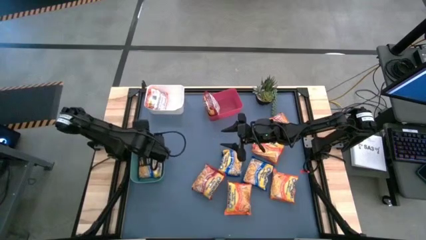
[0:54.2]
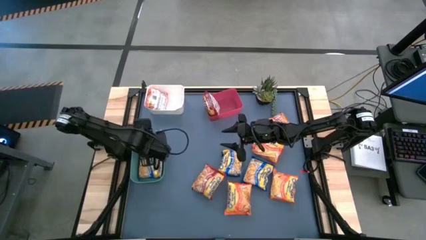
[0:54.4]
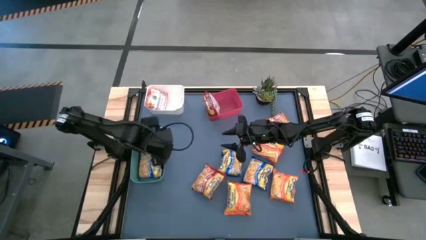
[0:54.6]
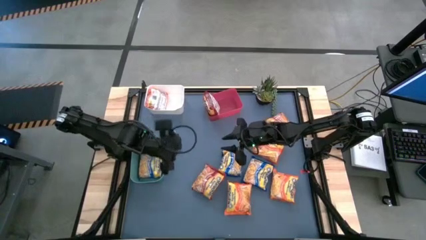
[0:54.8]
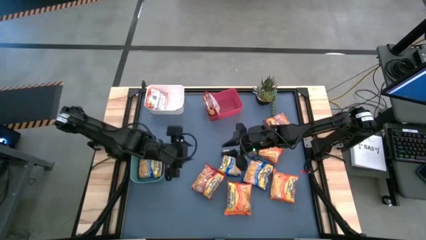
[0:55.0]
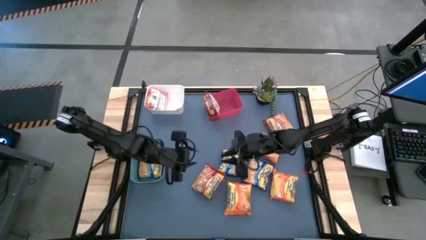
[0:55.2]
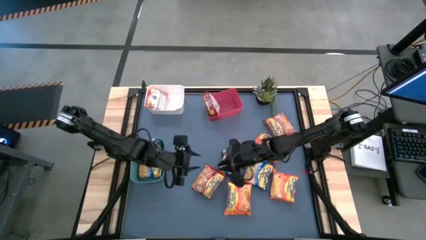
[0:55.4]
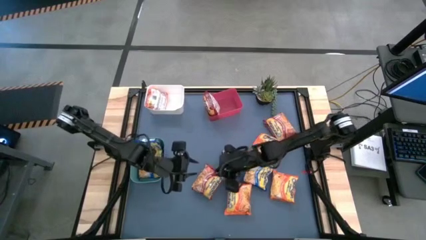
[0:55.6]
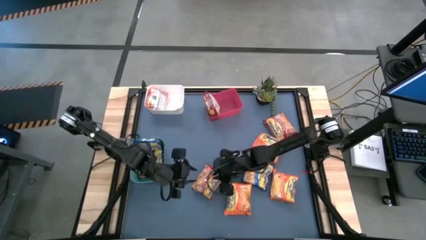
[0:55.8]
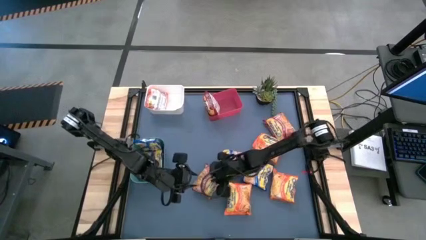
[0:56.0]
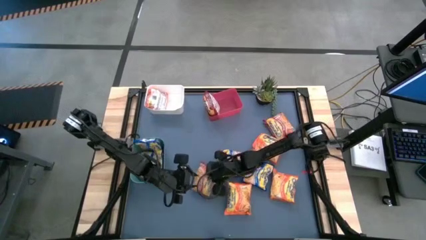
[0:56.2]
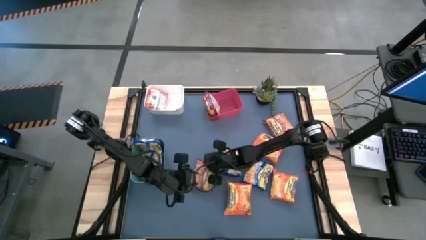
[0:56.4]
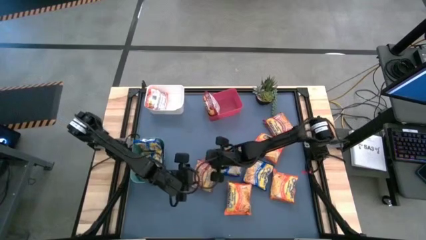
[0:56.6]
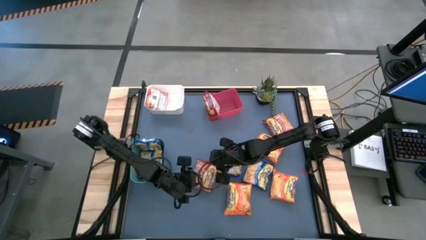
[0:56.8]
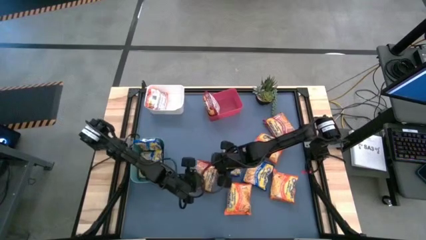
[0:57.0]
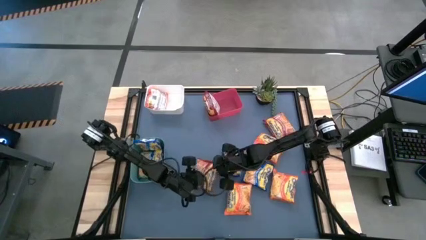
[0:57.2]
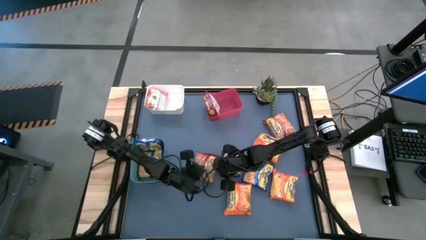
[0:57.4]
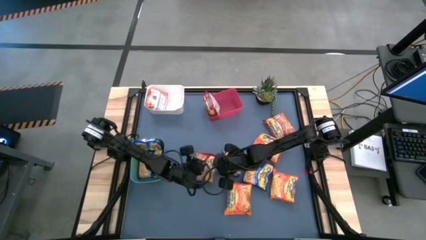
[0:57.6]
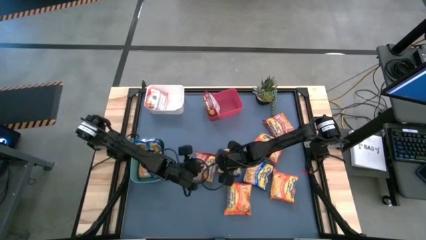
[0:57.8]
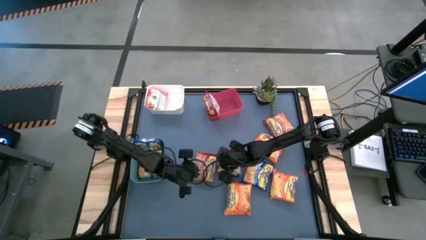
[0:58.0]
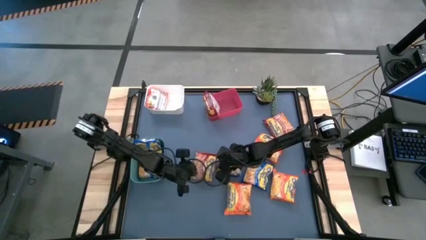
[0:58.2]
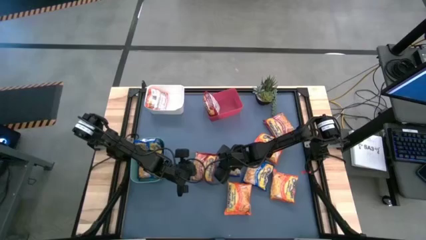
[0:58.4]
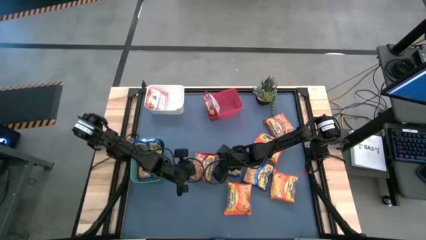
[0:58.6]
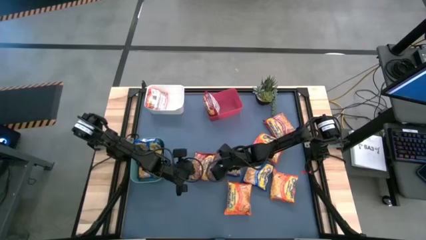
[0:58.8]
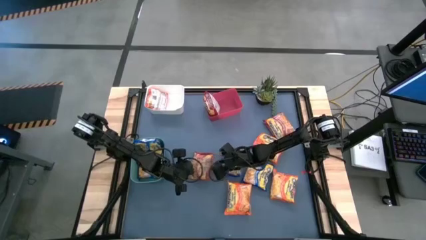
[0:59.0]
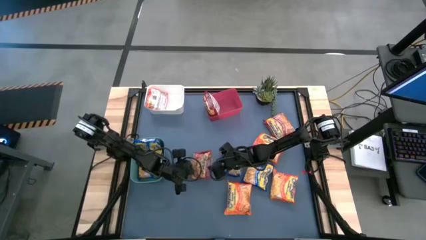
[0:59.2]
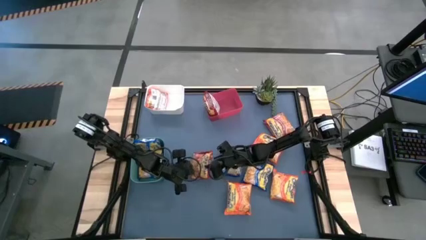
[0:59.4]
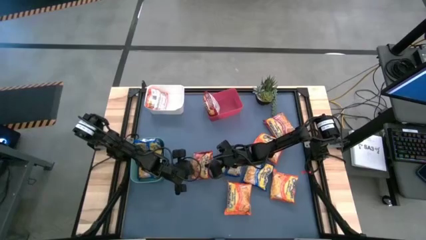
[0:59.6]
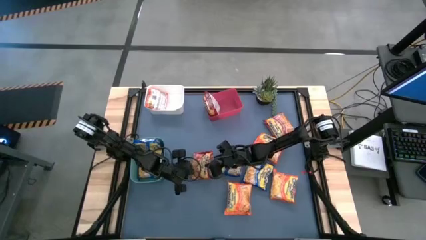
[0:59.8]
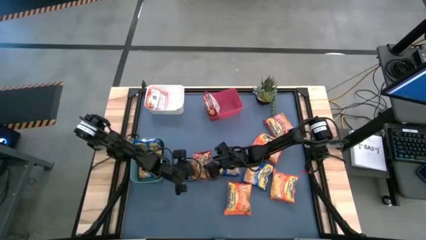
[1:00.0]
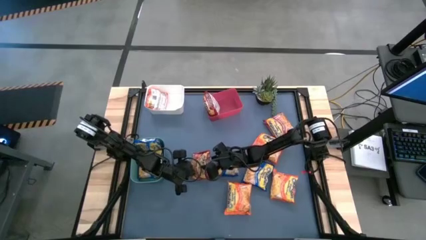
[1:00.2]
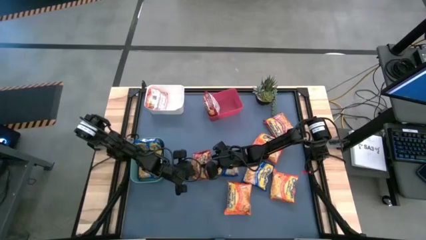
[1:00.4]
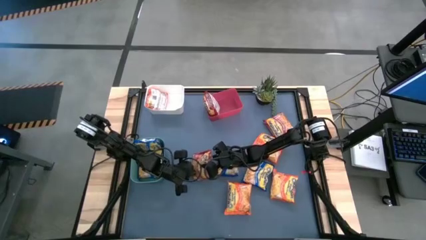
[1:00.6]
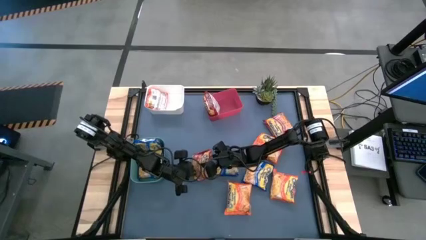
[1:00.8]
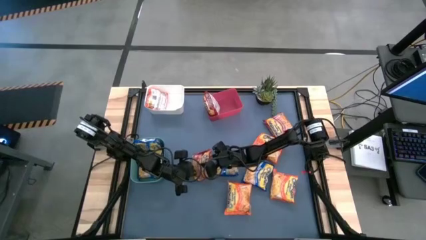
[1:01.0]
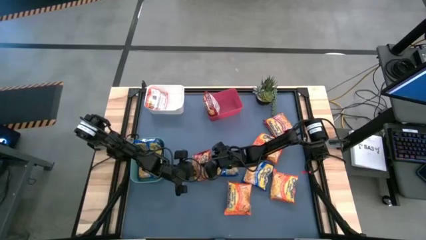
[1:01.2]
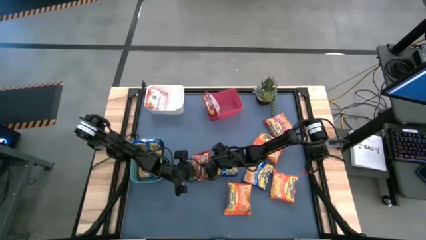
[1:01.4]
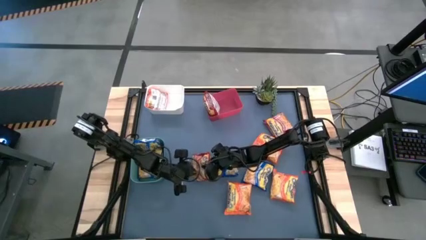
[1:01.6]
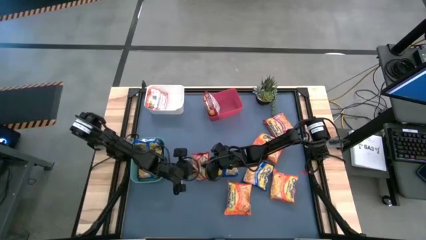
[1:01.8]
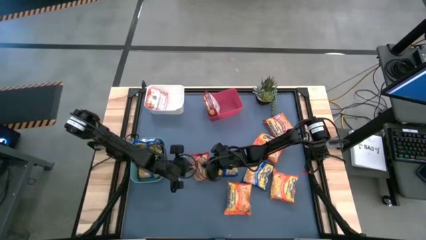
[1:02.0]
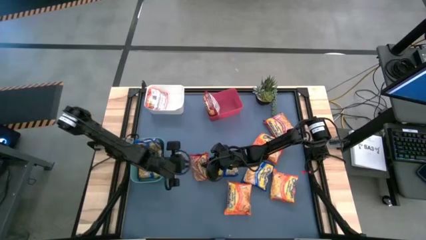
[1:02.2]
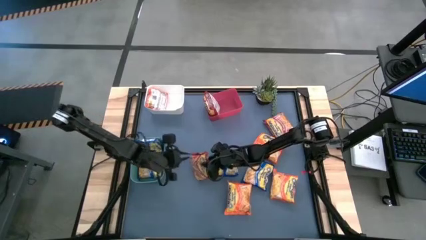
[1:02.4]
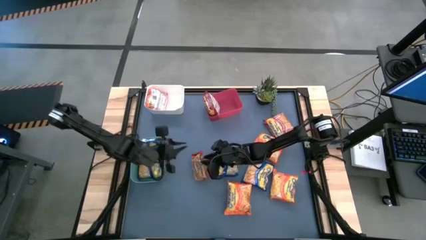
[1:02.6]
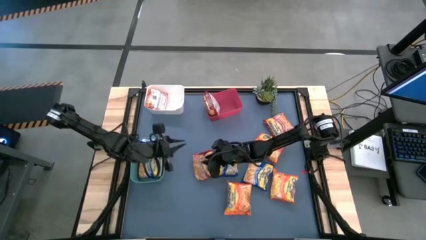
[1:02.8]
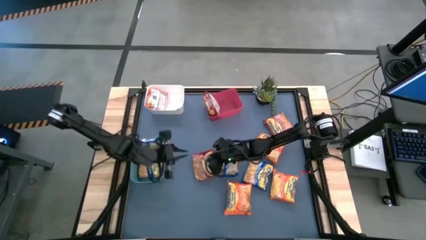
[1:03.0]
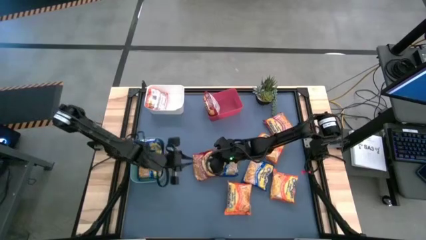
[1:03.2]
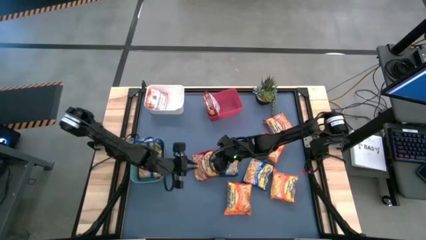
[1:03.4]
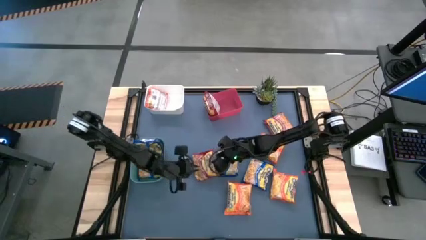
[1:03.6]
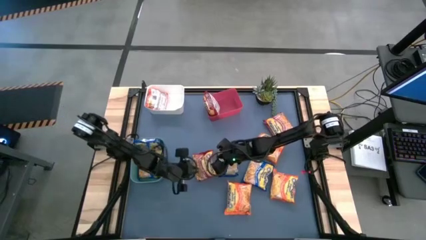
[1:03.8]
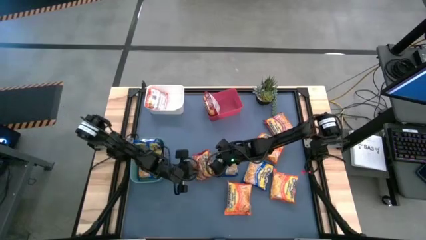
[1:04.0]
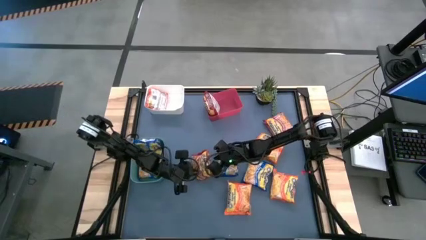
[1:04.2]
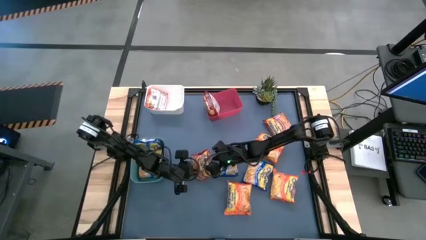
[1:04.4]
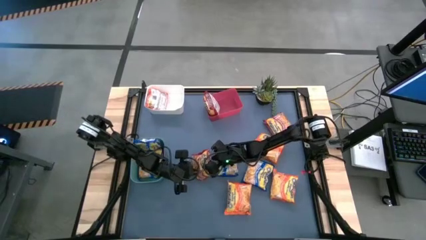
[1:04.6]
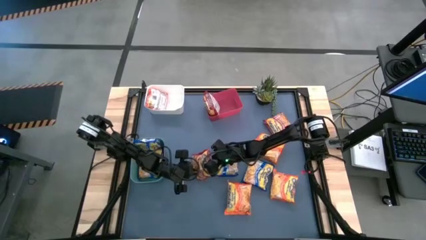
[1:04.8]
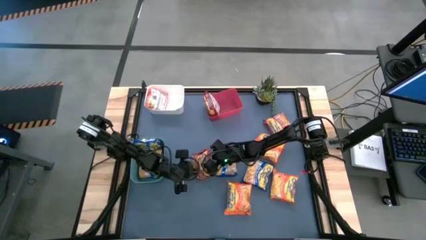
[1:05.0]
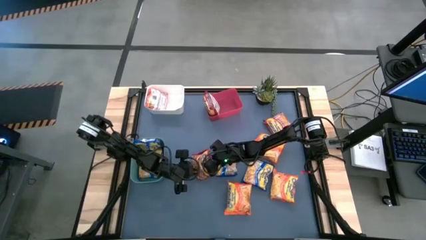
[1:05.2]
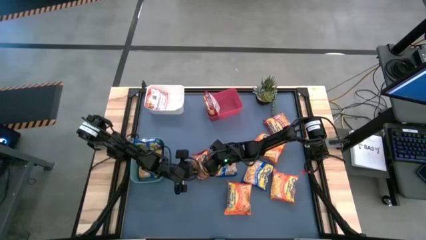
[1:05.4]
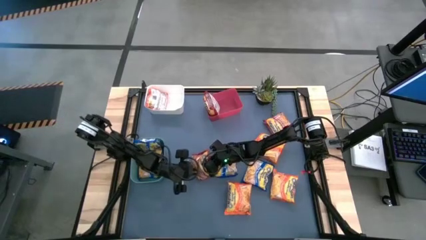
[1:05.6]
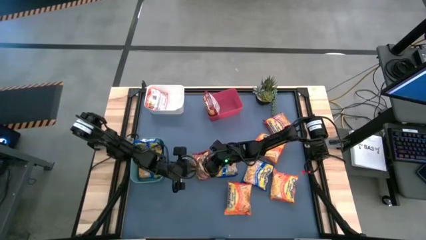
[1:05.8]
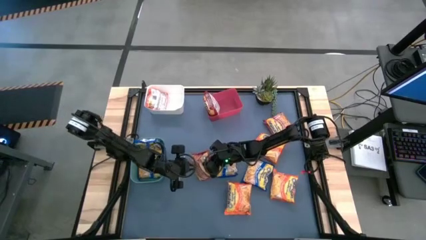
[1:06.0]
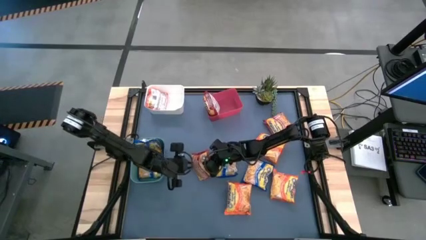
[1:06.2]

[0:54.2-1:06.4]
Task: Sort Maruchan noodles
Put the red noodle pack into the red bin

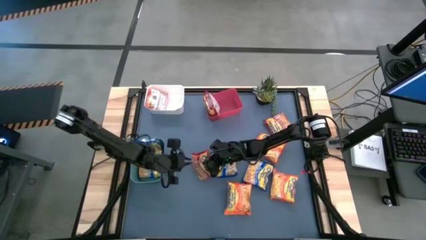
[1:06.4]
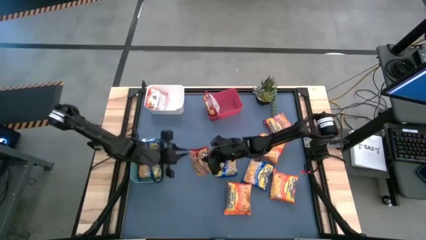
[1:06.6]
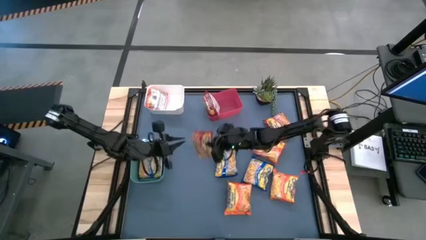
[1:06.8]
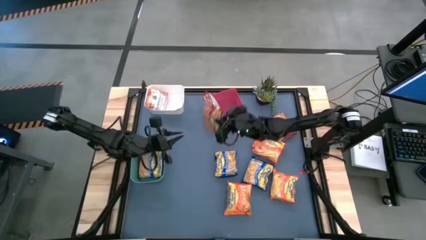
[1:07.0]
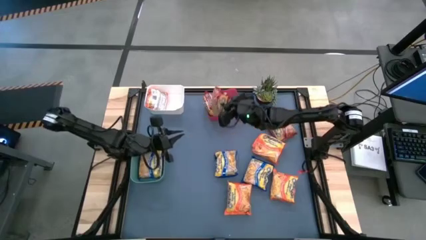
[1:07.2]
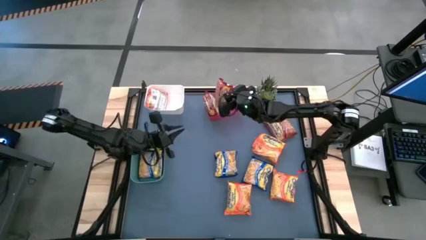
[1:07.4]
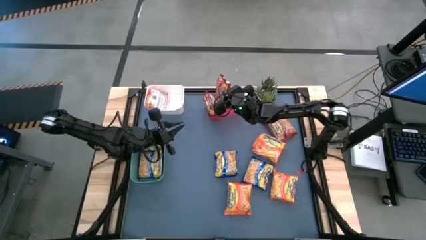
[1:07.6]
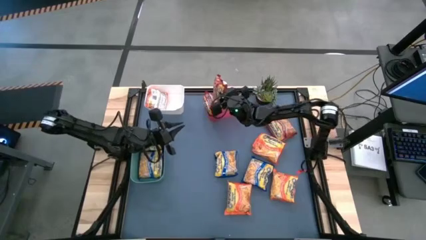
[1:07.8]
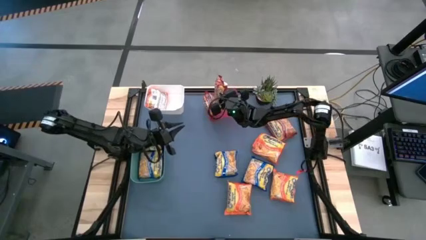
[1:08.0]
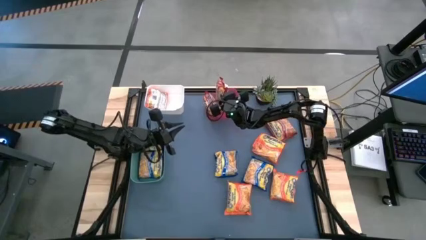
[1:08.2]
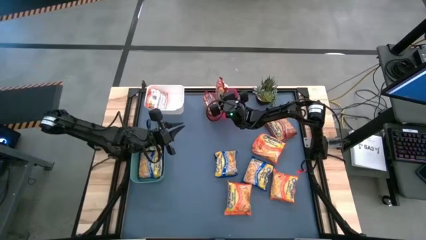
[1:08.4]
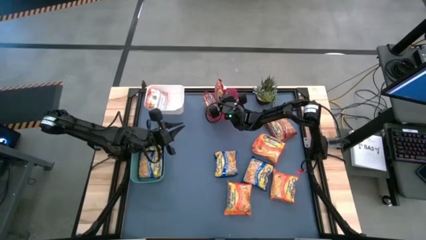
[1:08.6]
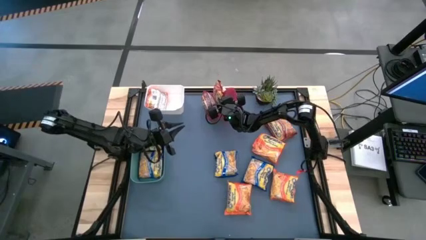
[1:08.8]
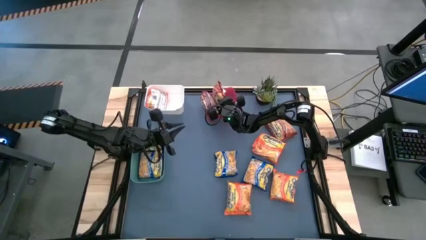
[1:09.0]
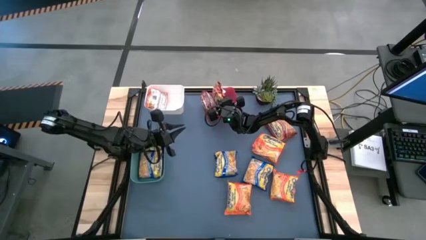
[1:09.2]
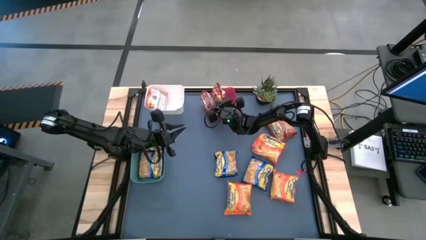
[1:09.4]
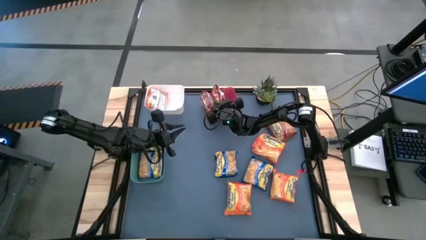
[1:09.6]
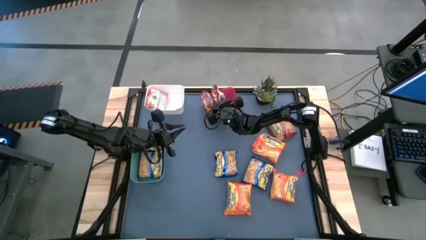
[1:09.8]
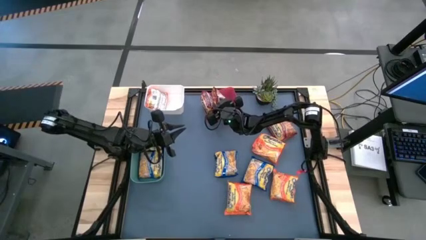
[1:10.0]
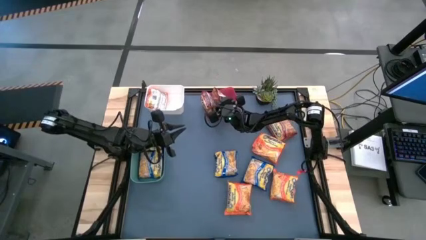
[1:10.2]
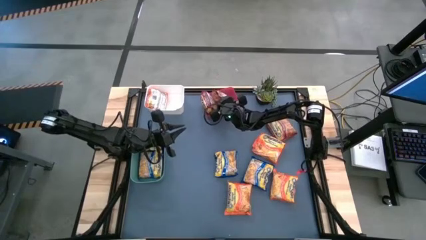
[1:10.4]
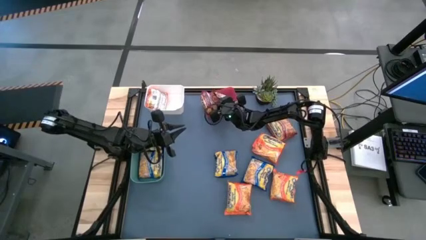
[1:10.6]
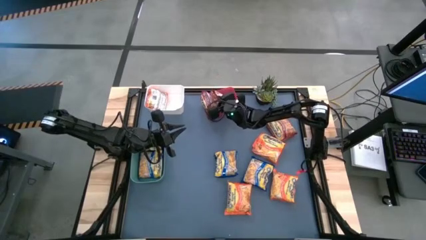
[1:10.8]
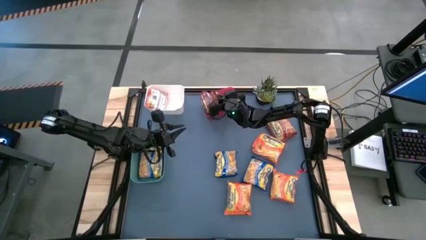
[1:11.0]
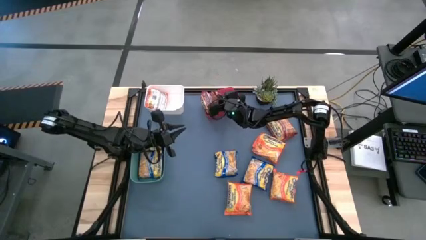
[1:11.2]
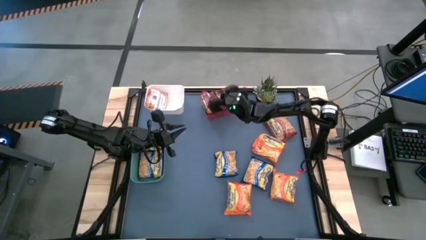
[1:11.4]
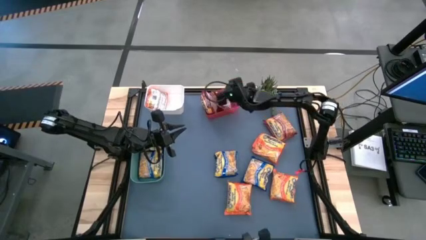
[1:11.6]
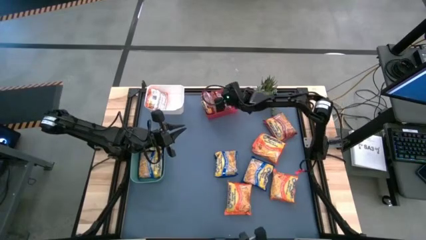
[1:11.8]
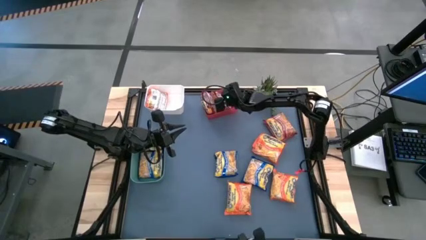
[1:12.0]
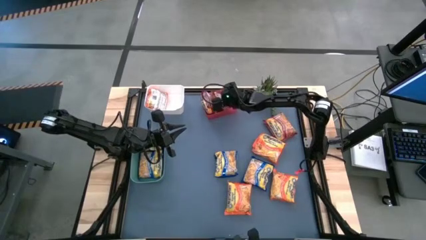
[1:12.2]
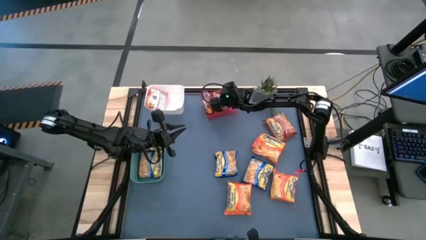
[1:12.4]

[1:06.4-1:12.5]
Put the red noodle pack into the red bin
